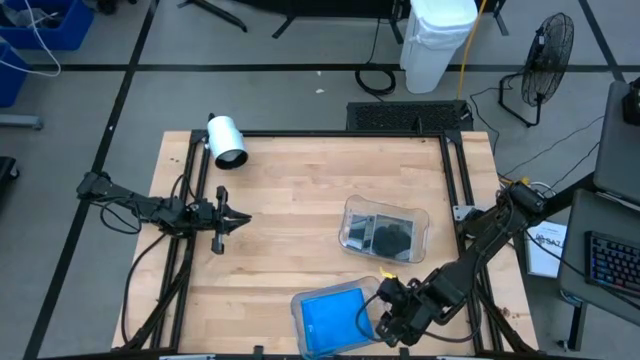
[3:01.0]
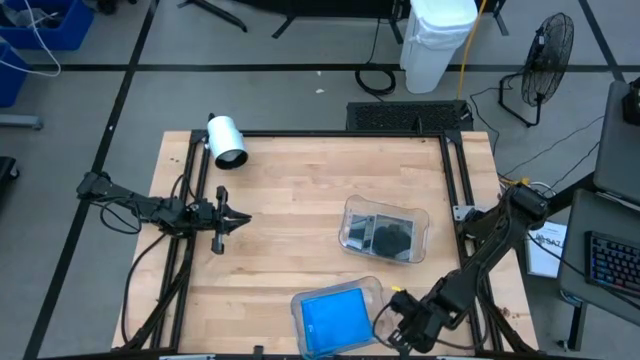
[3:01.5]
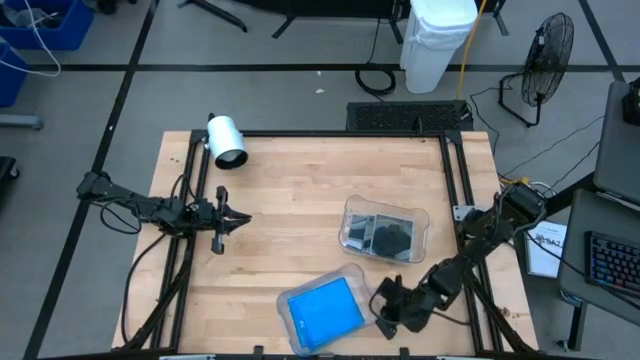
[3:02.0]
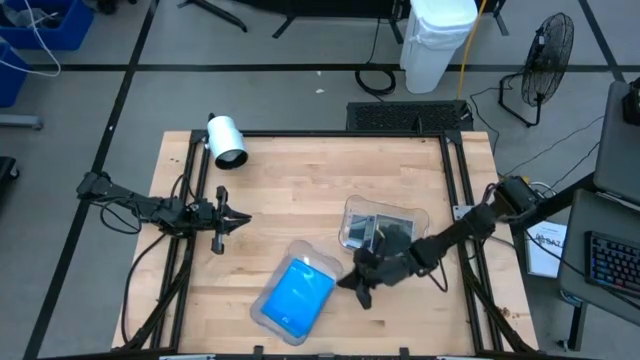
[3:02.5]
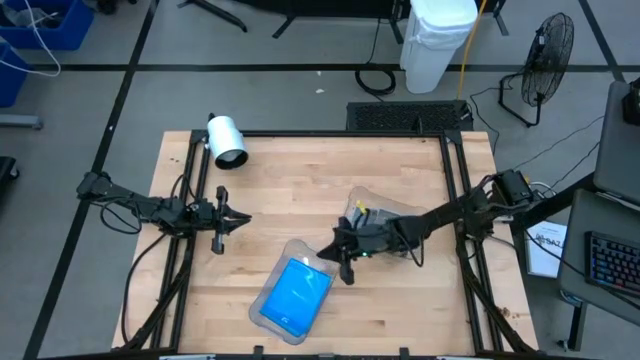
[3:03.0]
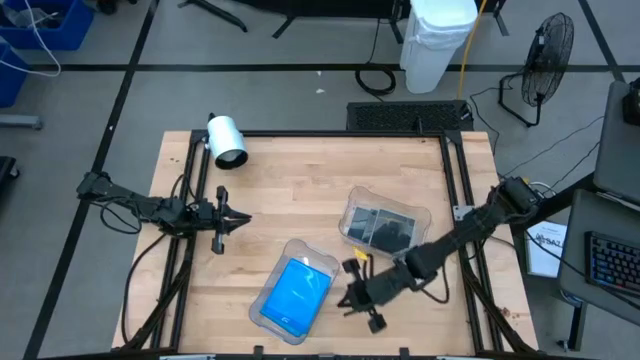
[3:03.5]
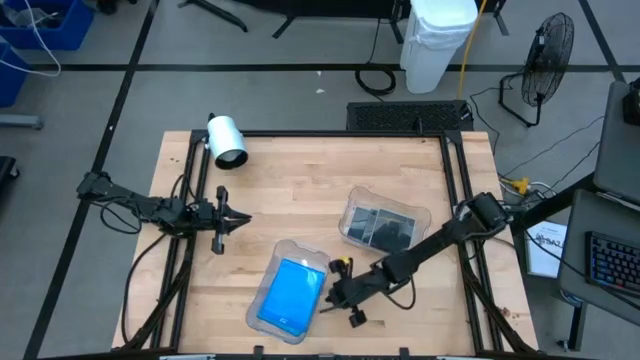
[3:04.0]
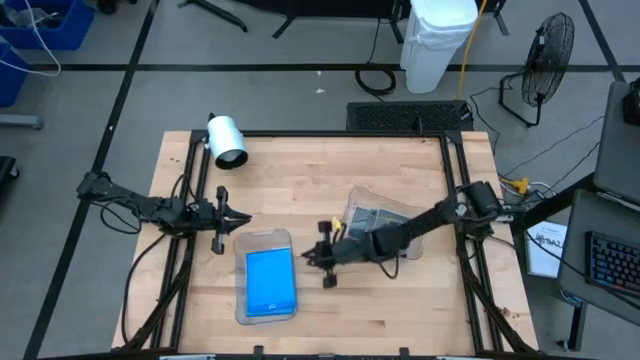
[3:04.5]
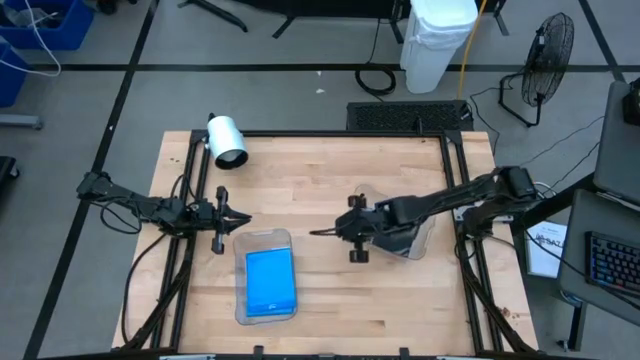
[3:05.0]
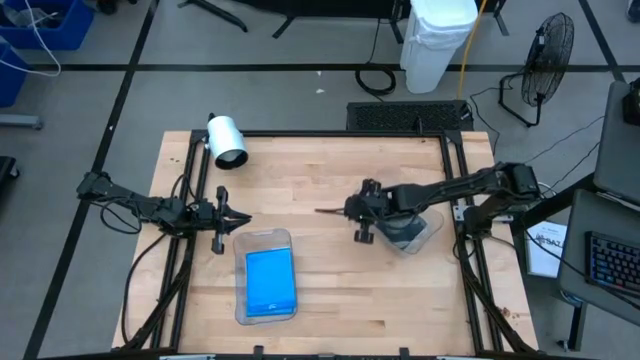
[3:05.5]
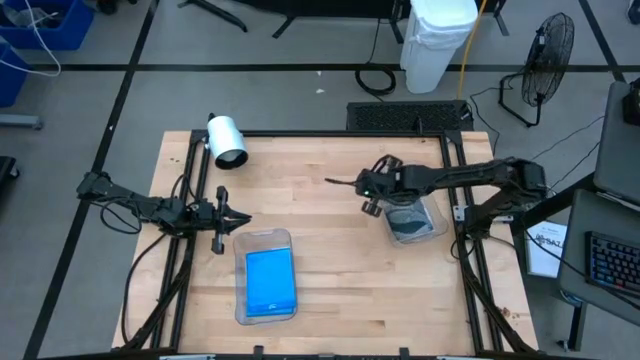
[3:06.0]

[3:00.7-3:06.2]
Task: Pick & place jewel cases by type
Adjust the transparent bins

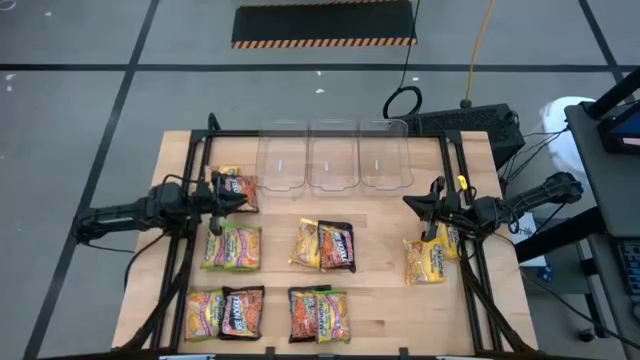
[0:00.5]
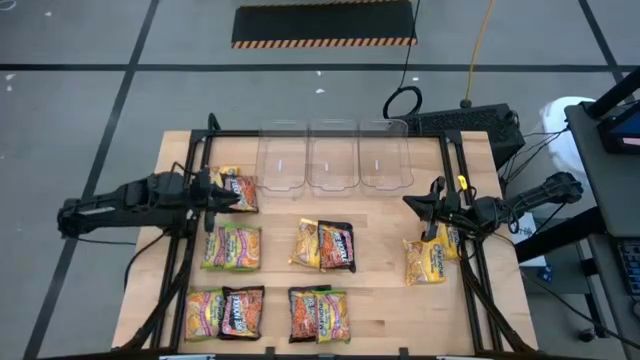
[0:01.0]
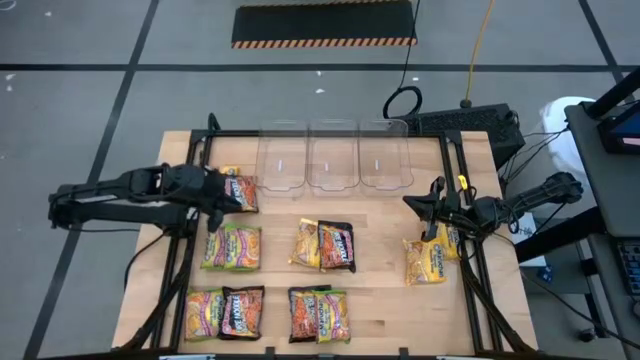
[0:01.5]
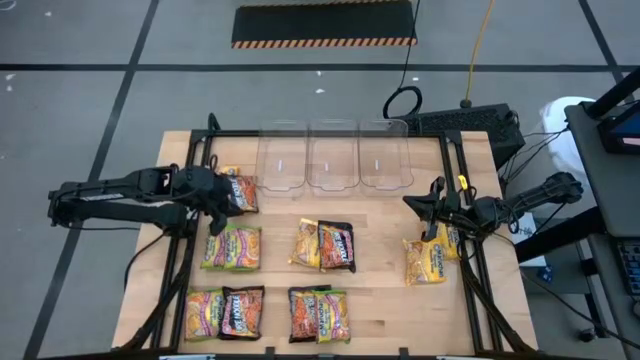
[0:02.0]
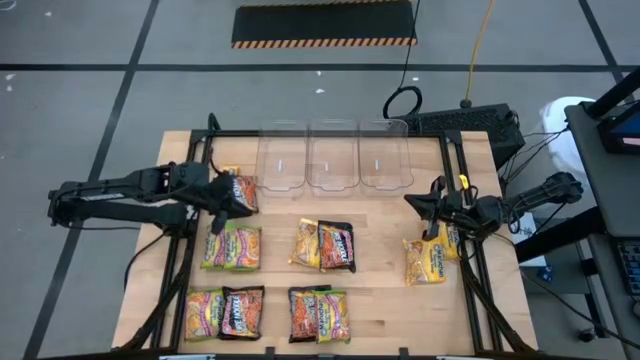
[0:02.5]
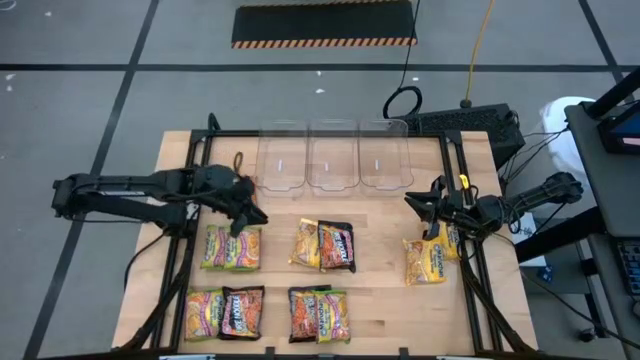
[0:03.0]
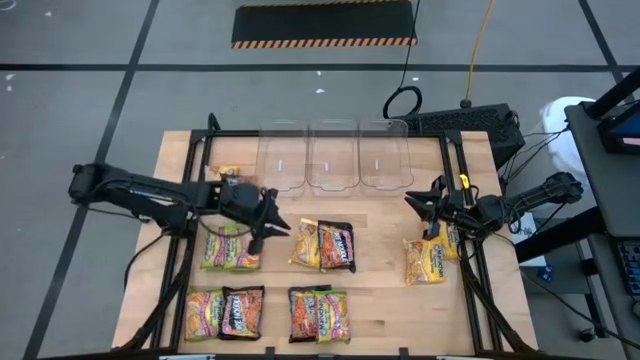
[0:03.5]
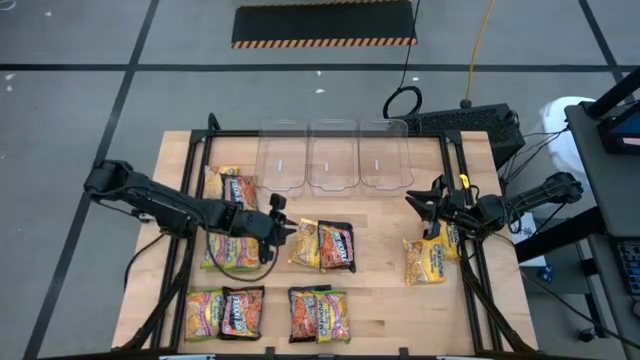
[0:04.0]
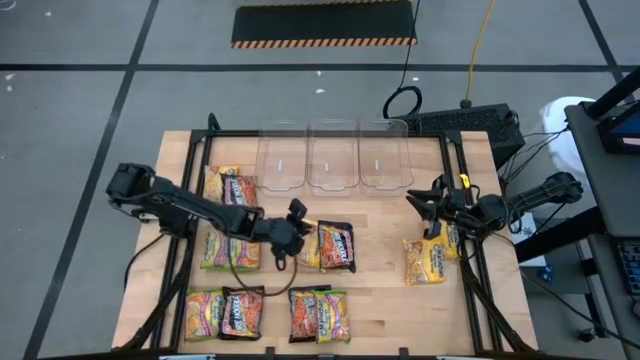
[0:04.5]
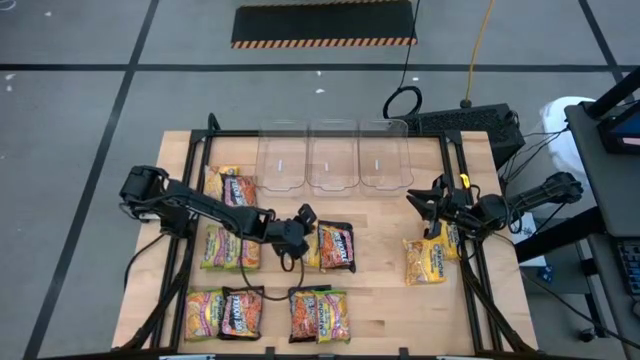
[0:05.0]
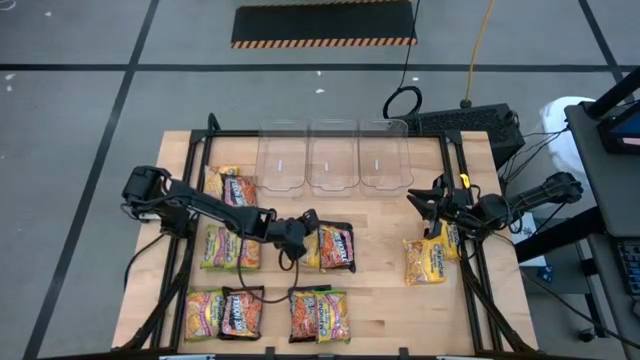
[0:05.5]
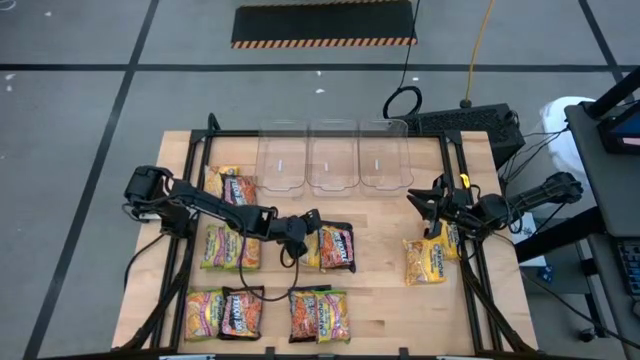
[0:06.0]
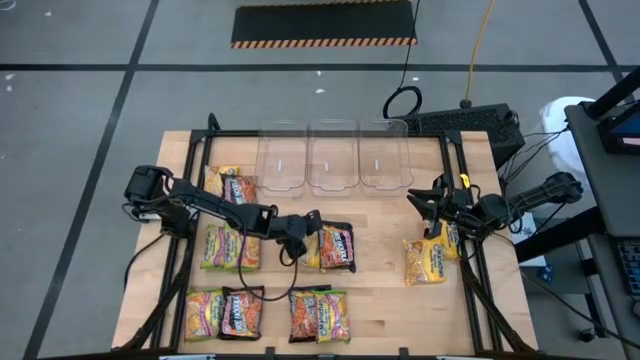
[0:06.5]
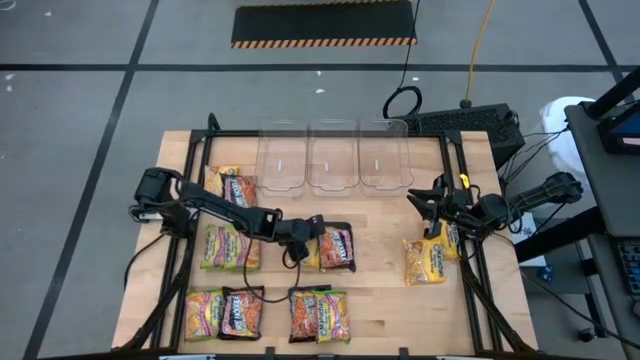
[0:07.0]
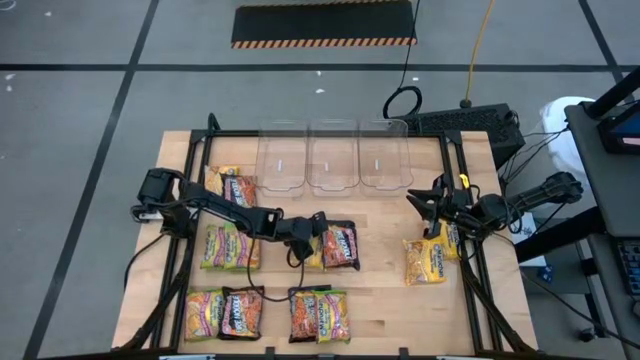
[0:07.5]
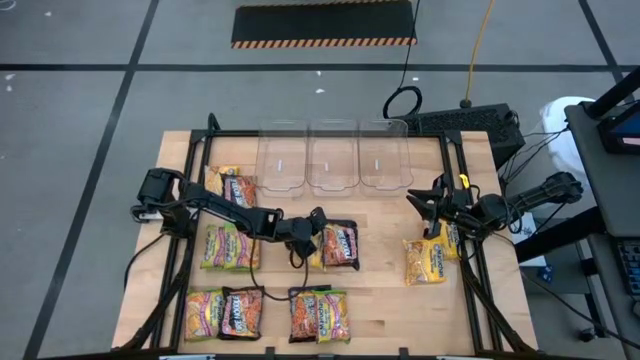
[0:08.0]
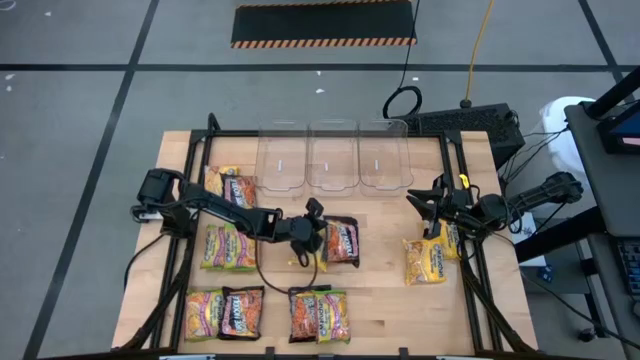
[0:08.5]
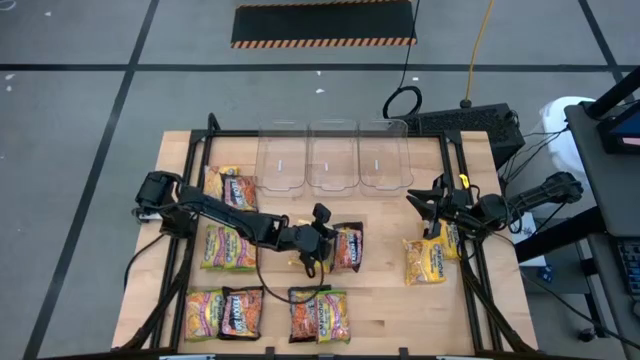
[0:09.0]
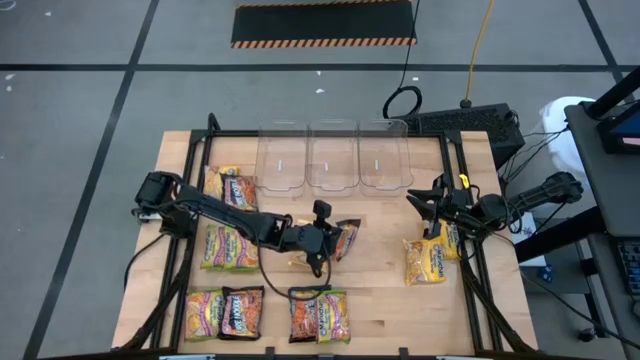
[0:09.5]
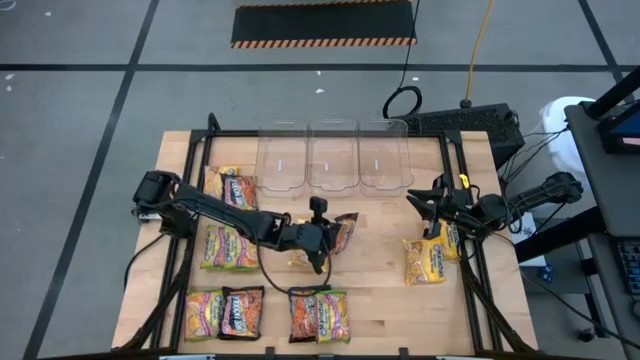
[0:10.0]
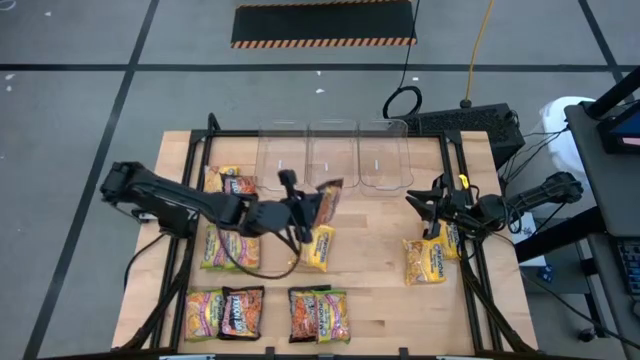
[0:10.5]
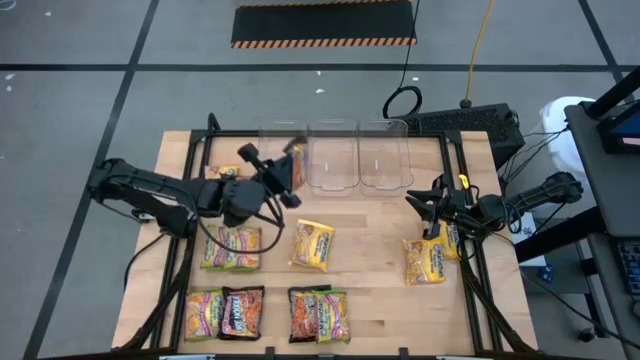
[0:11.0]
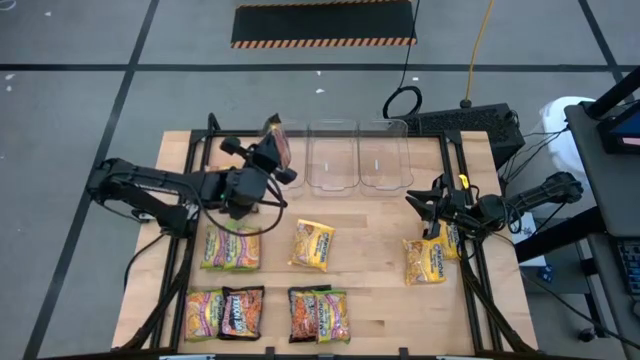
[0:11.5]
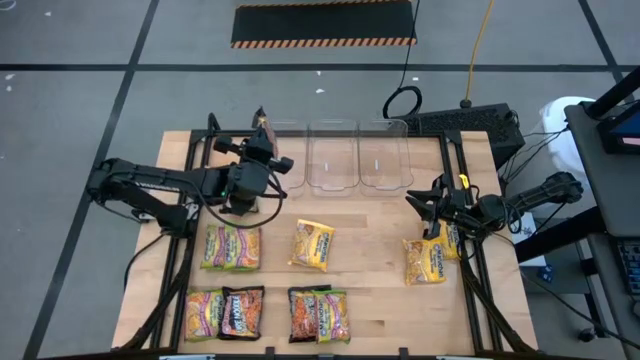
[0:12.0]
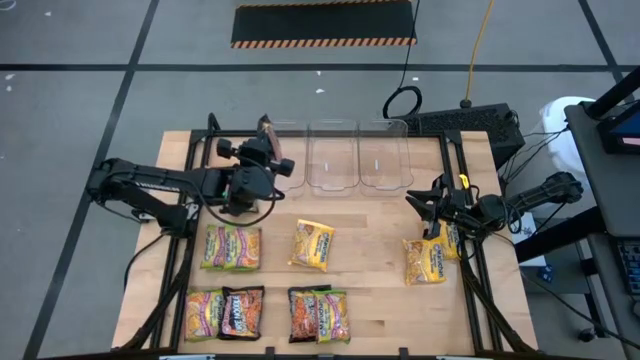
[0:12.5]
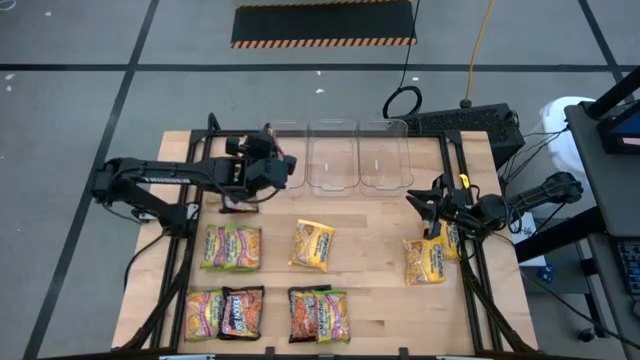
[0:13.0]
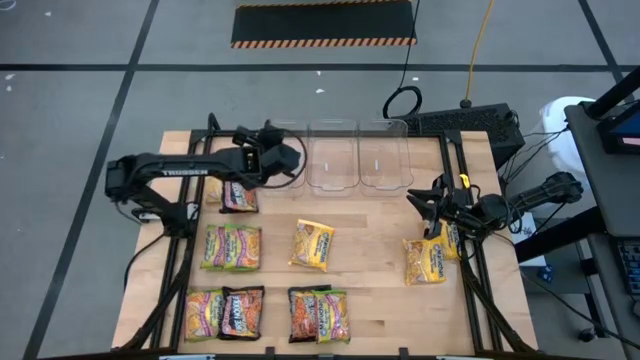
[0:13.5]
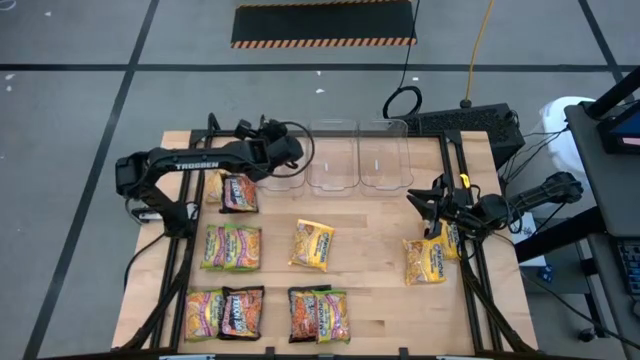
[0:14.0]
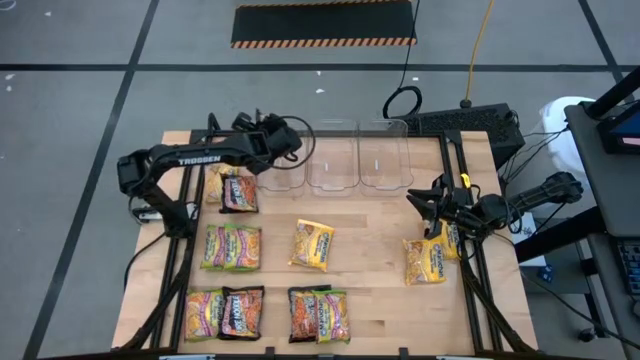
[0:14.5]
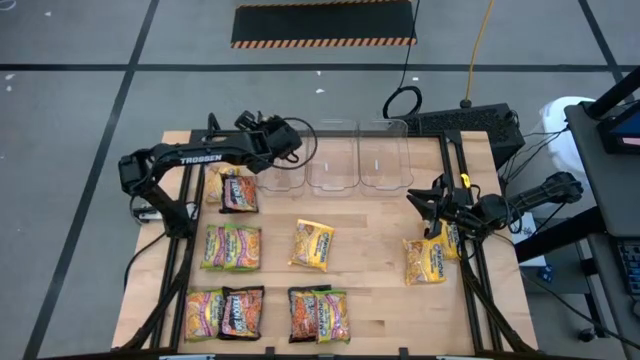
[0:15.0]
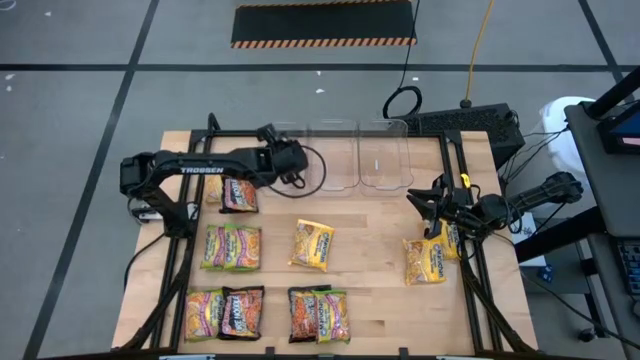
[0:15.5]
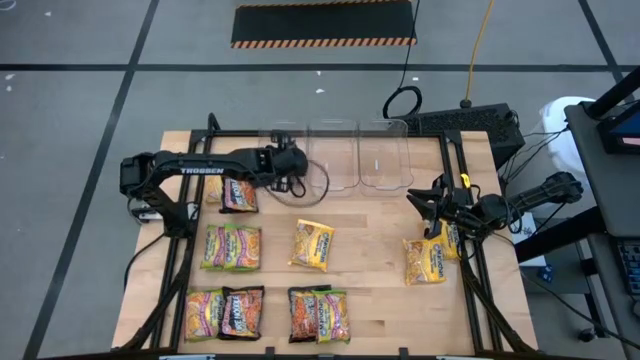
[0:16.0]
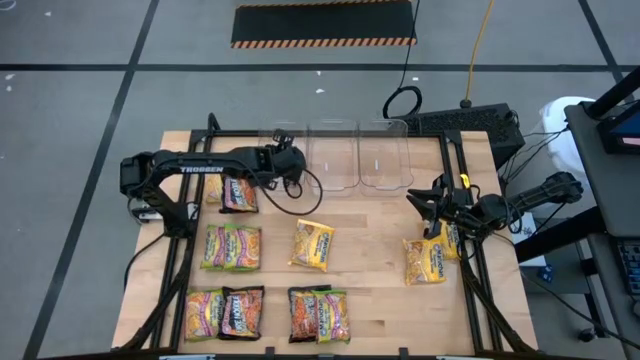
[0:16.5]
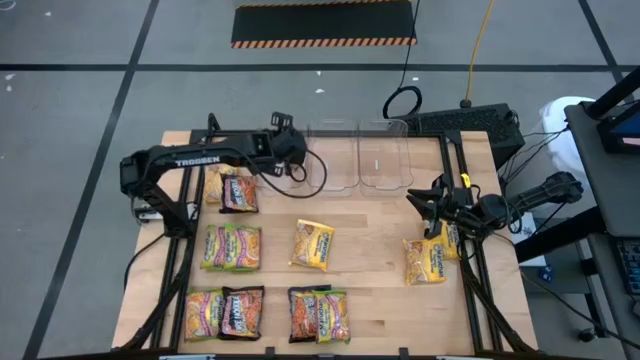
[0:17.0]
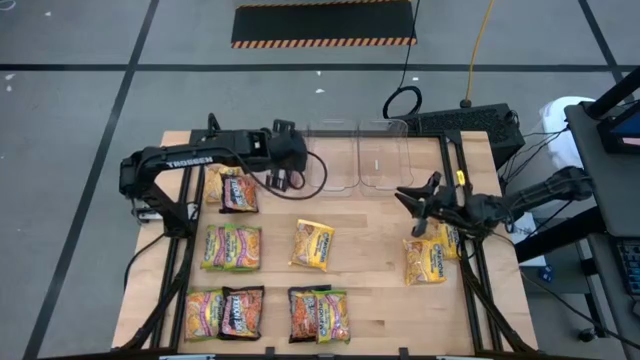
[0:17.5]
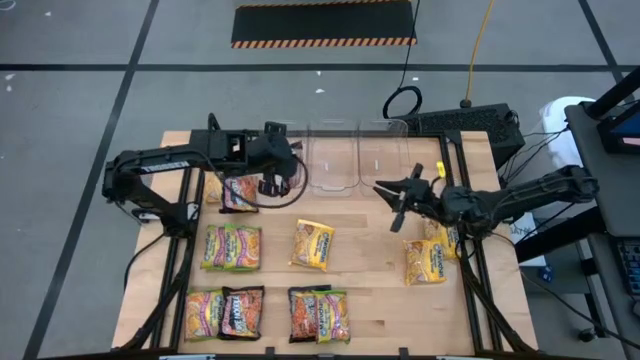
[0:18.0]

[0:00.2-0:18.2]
Task: Sort Maruchan noodles
Put the black noodle pack into the left transparent bin
